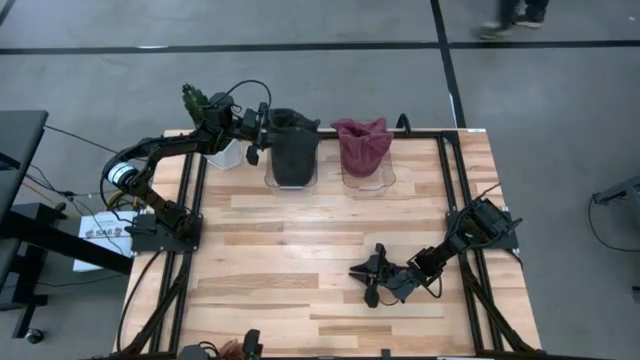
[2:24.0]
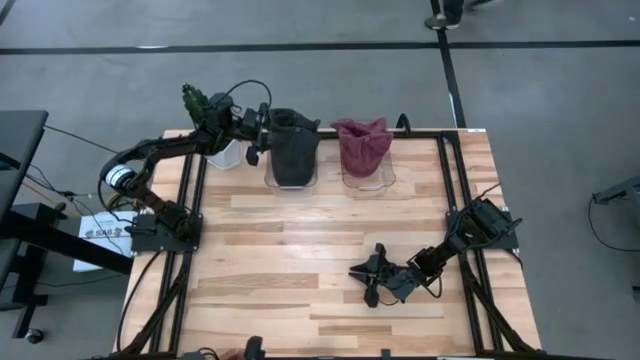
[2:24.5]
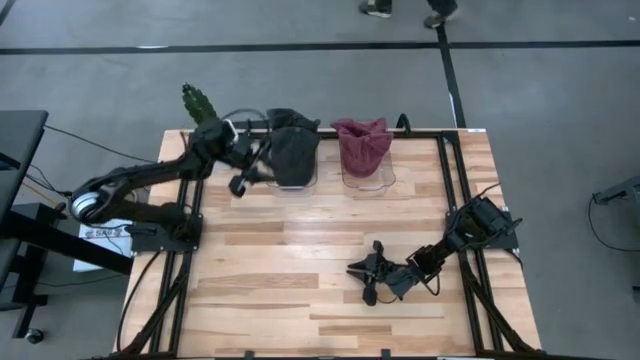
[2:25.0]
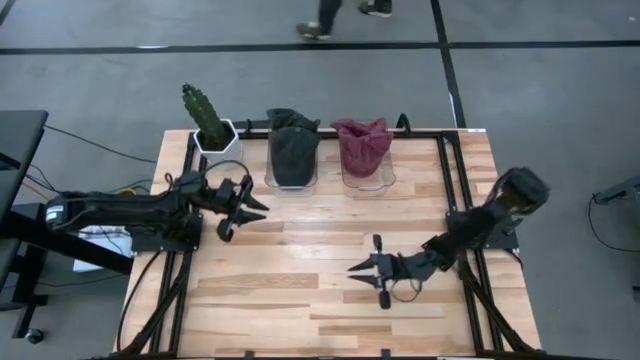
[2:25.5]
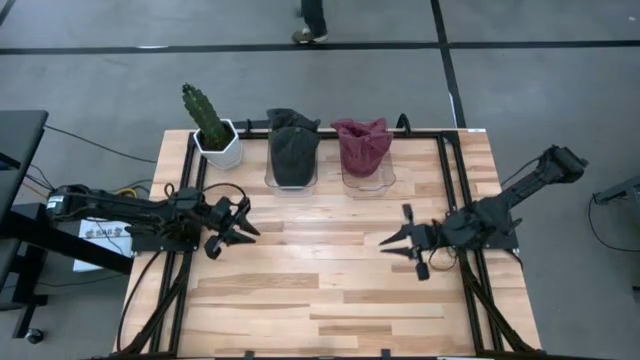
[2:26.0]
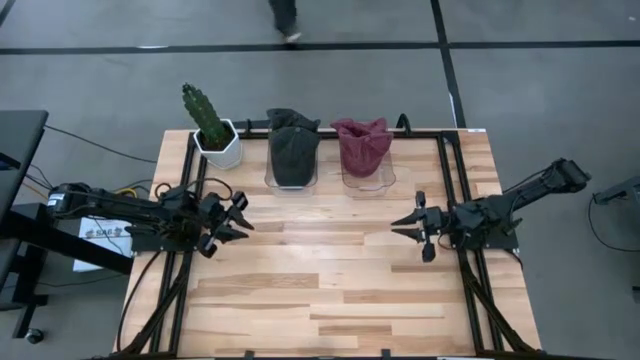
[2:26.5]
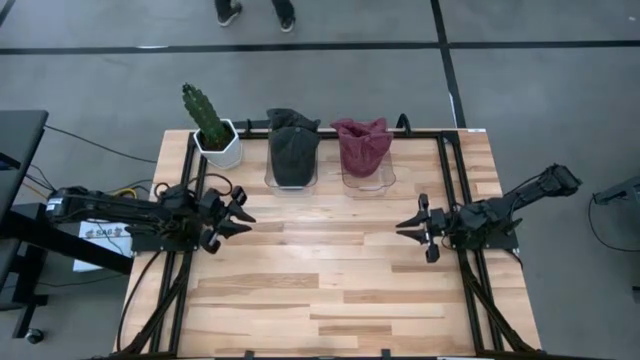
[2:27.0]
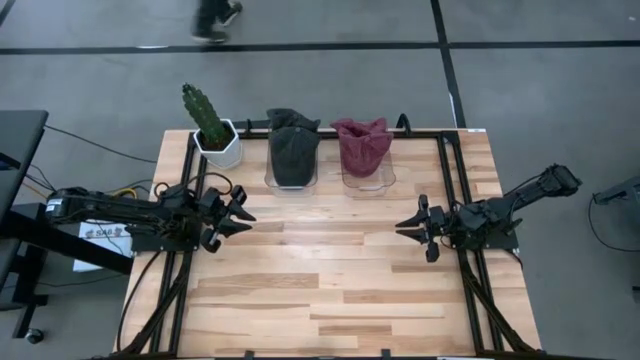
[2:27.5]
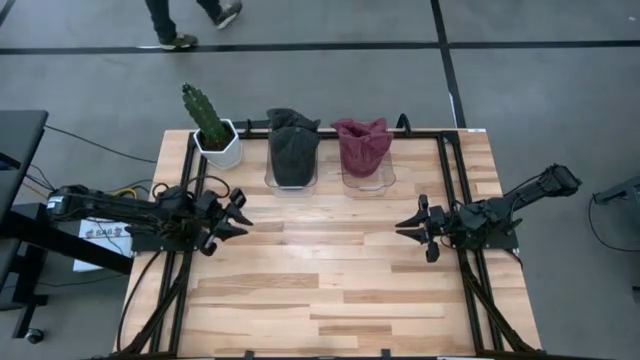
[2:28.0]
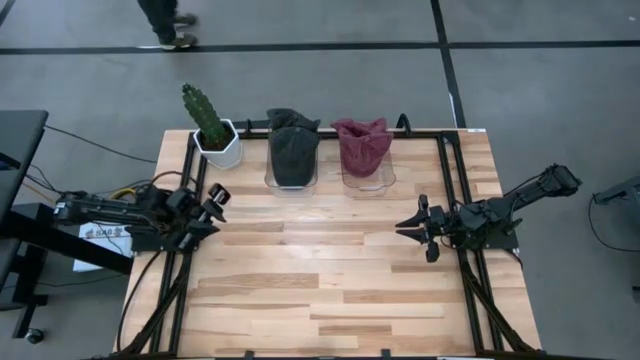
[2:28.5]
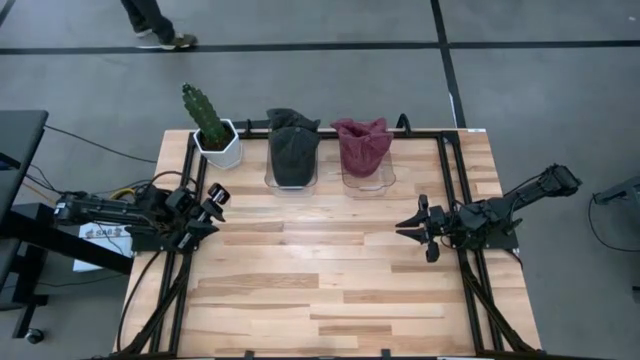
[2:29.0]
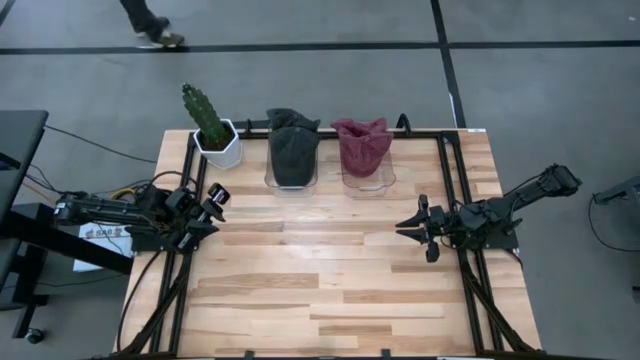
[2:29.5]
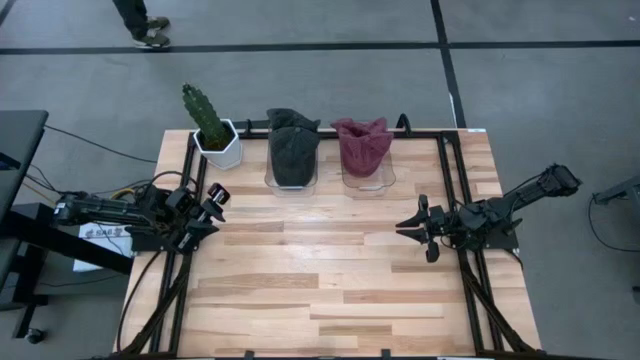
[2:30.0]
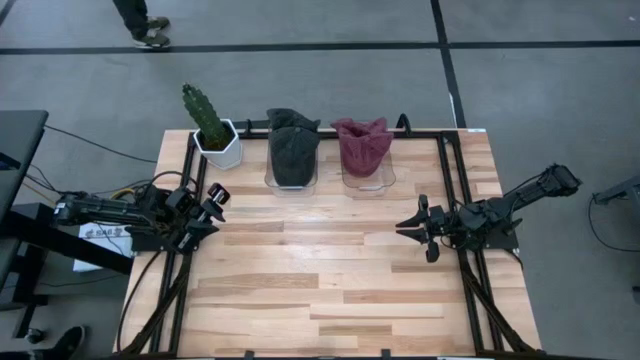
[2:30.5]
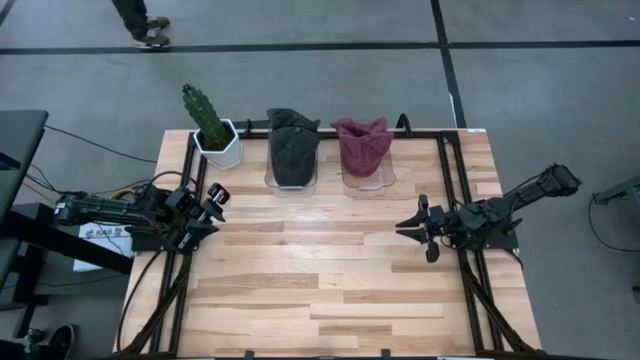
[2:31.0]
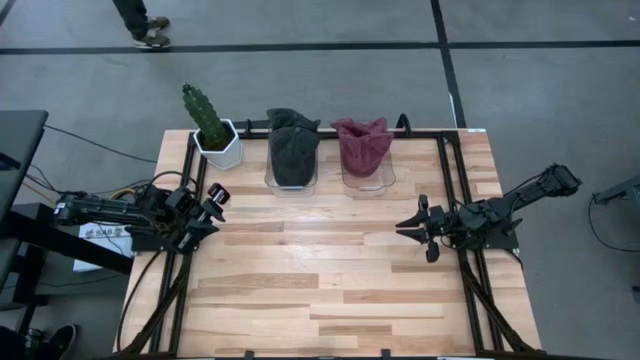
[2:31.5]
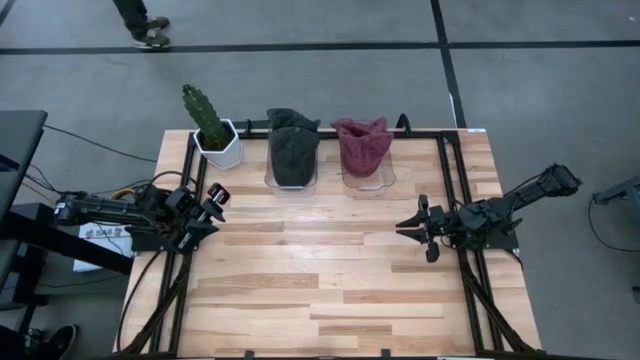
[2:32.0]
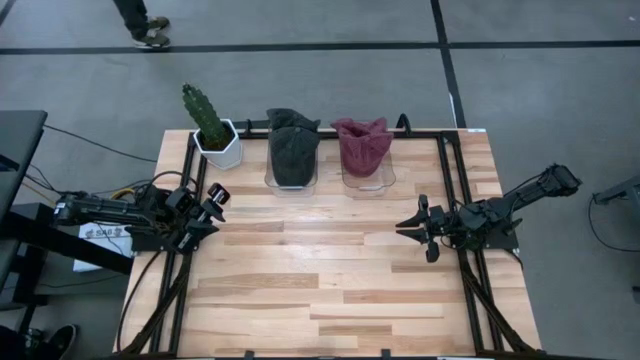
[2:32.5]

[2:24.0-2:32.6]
Task: Pick & Place hat
Return to Home Position

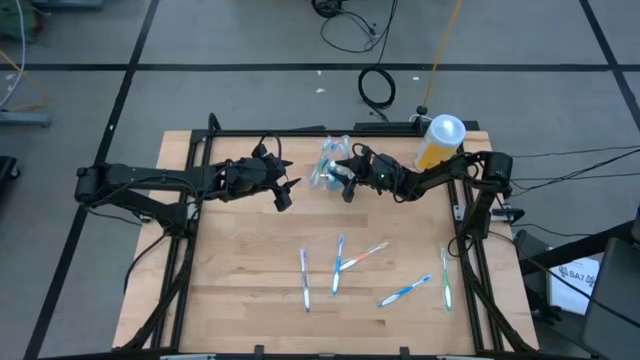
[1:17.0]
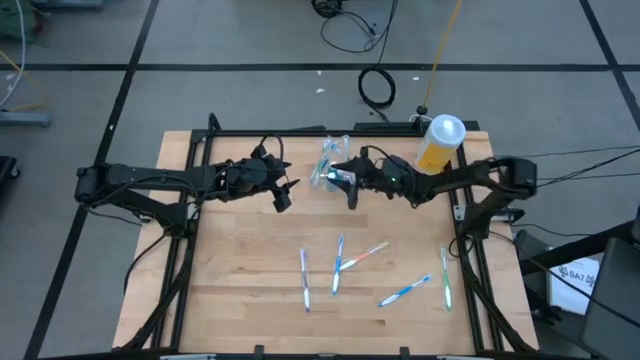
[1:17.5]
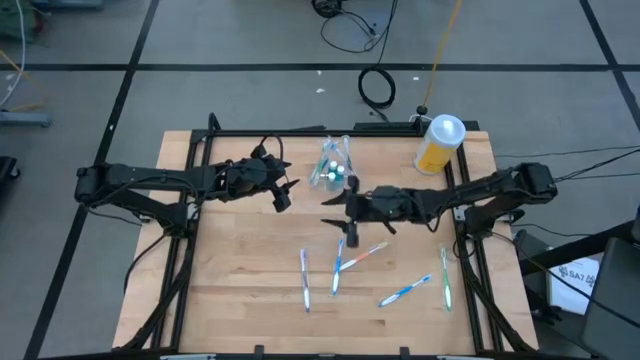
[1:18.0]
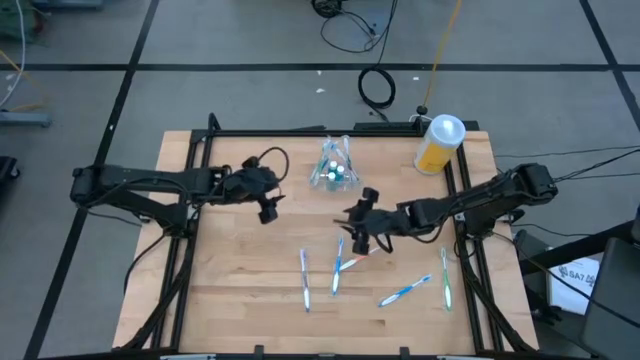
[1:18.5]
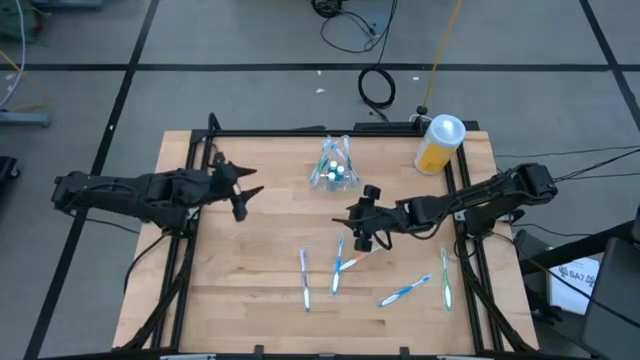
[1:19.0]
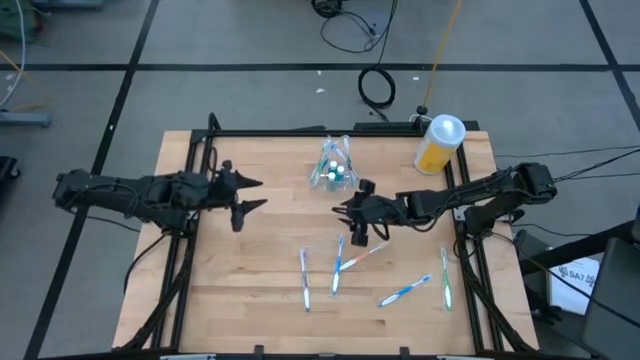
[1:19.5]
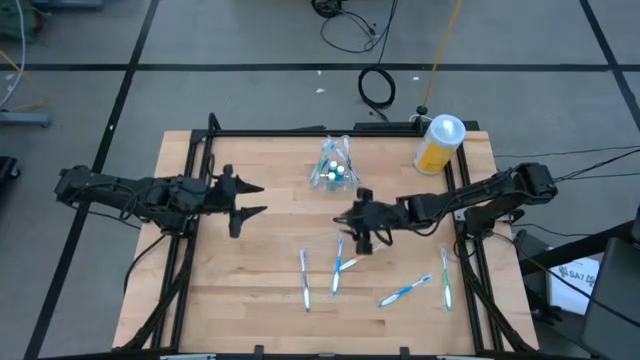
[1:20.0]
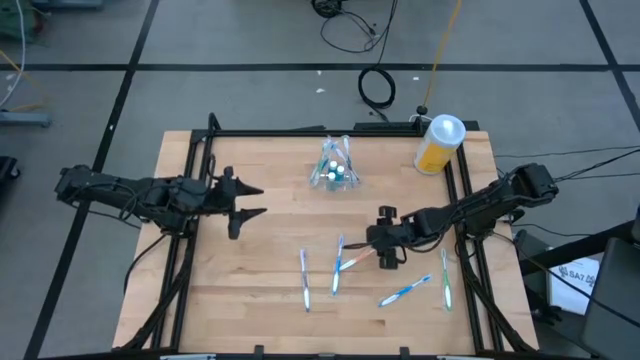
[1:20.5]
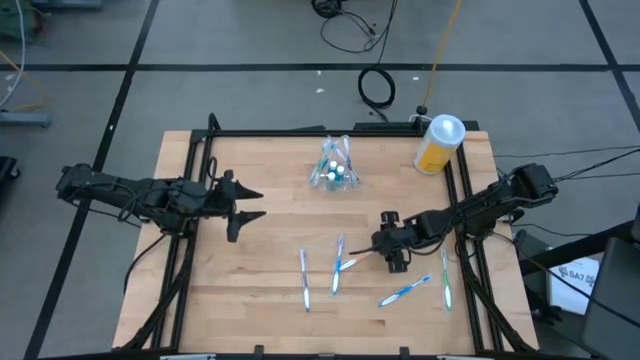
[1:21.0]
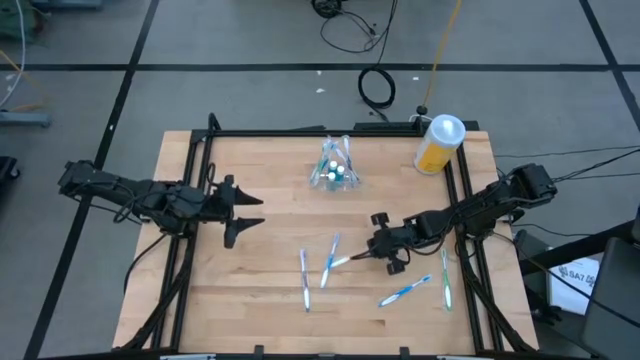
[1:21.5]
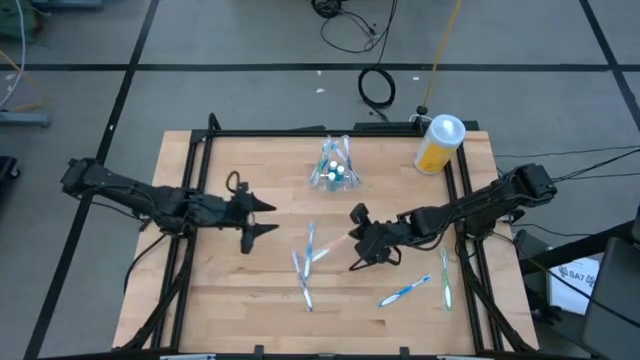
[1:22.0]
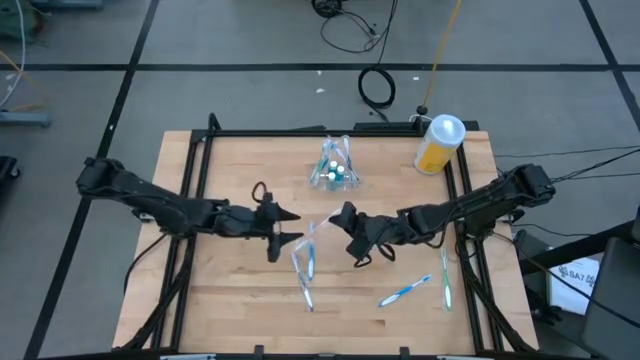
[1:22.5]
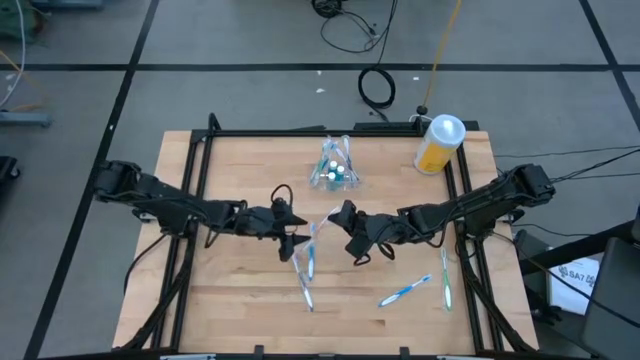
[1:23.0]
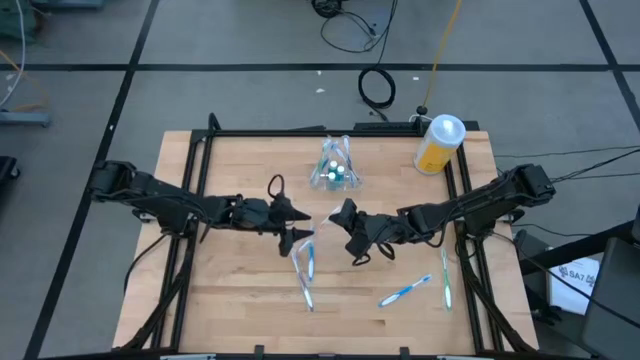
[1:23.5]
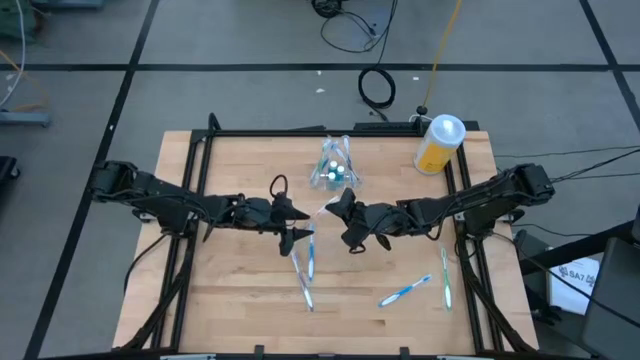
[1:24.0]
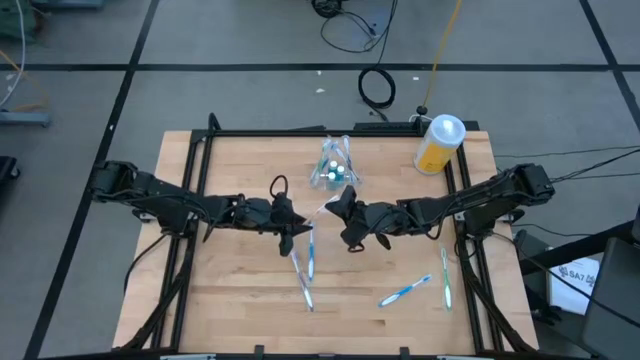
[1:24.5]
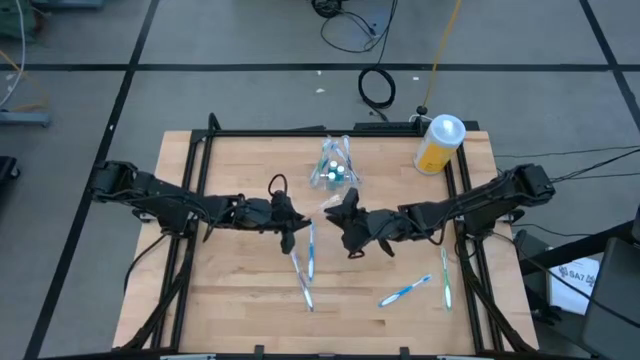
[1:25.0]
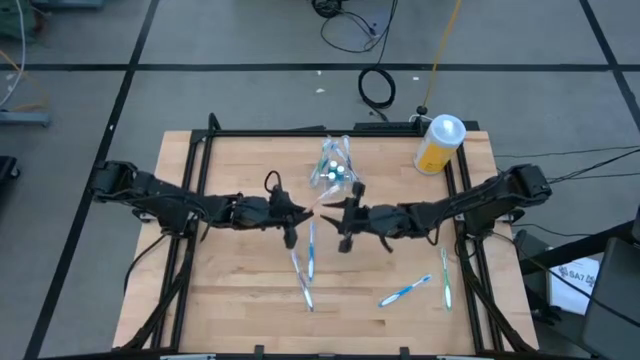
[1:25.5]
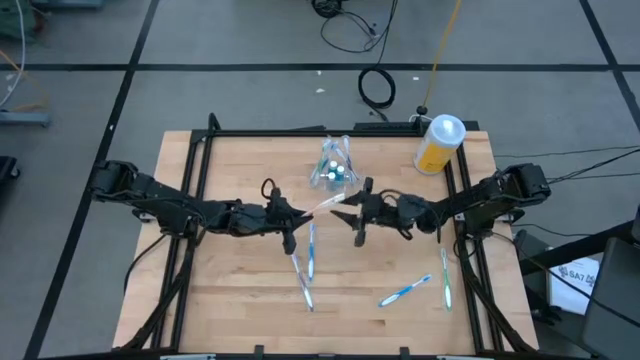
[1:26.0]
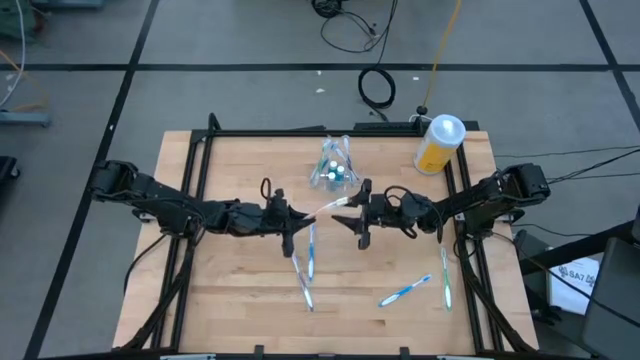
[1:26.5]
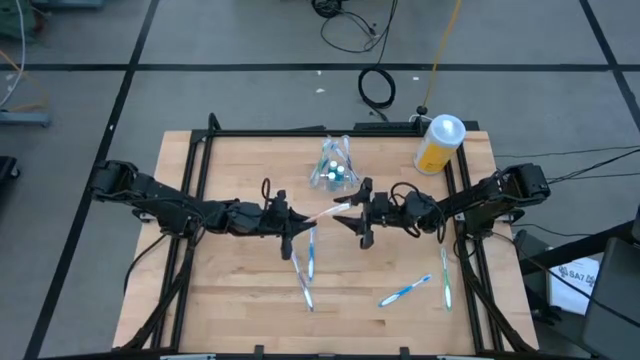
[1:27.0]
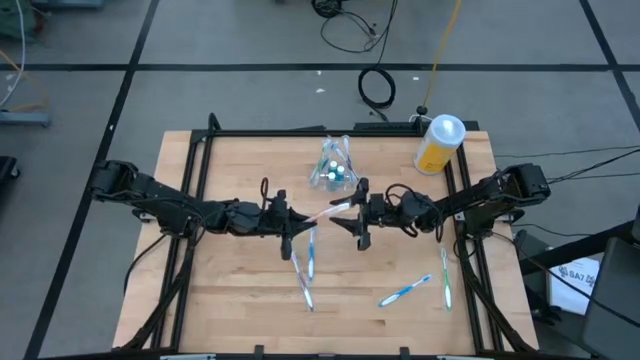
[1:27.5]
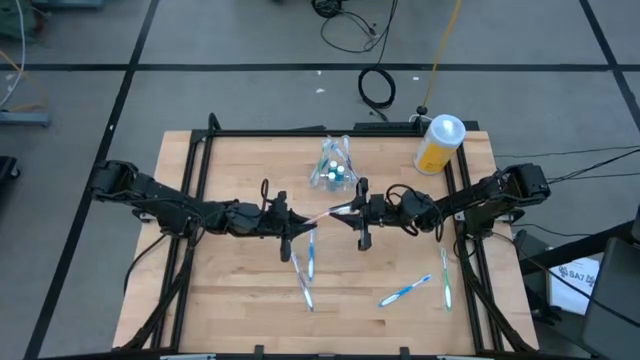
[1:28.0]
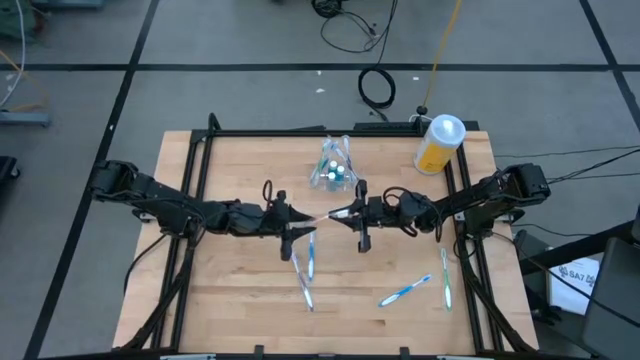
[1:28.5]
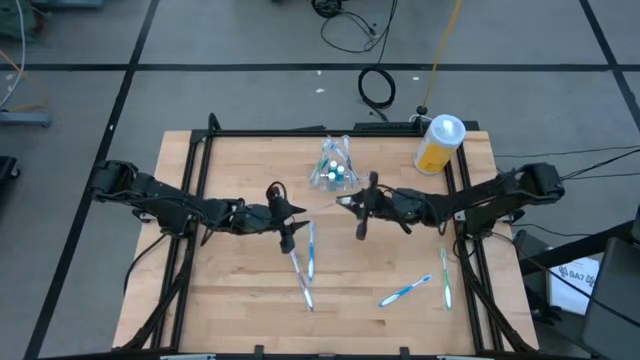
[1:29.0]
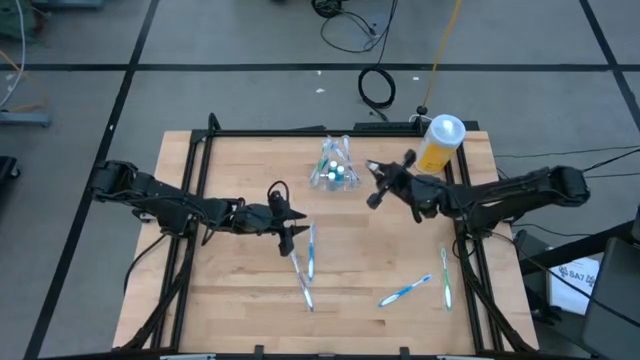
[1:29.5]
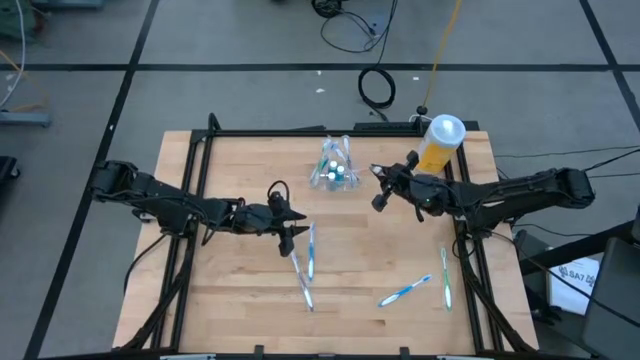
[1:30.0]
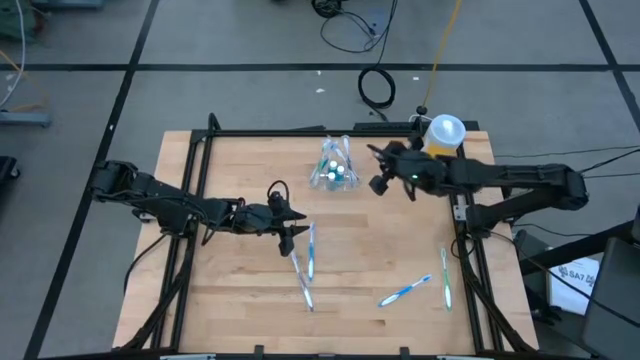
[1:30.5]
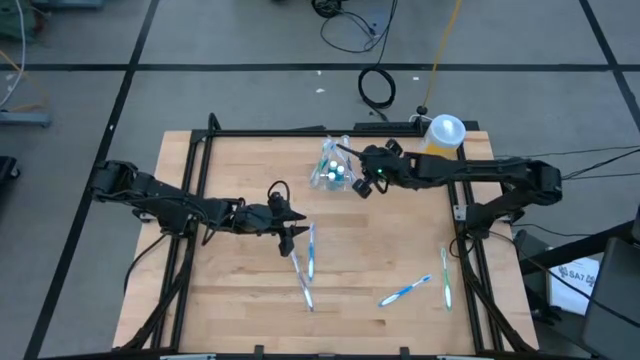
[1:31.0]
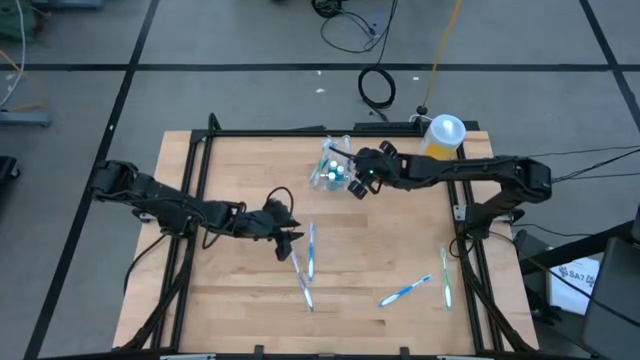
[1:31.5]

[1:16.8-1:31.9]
Task: Pick & Place toothbrushing station
Put the orange toothbrush into the transparent organizer
